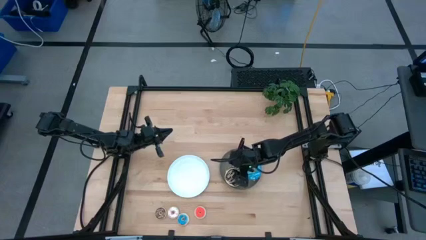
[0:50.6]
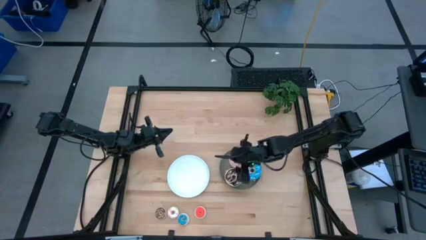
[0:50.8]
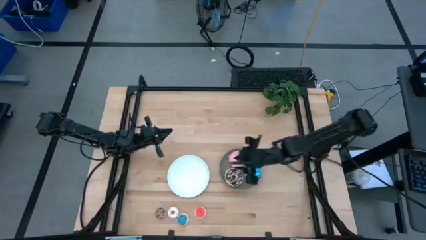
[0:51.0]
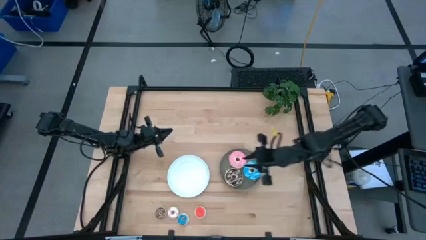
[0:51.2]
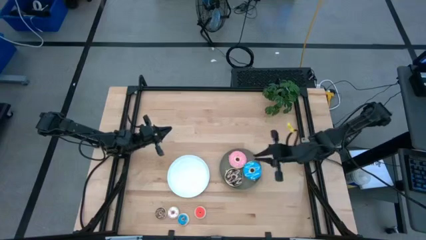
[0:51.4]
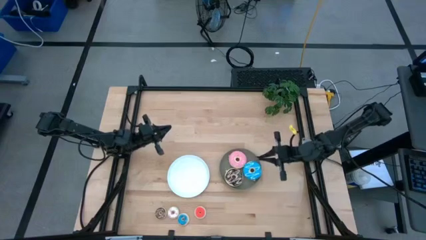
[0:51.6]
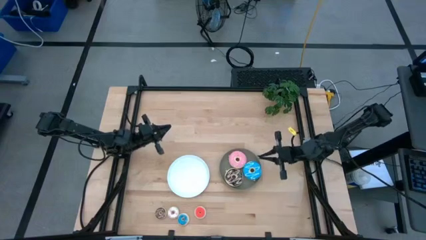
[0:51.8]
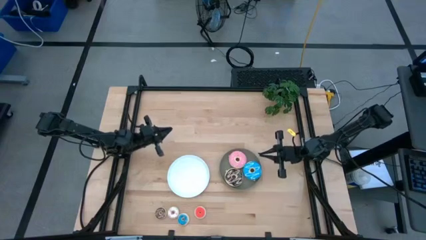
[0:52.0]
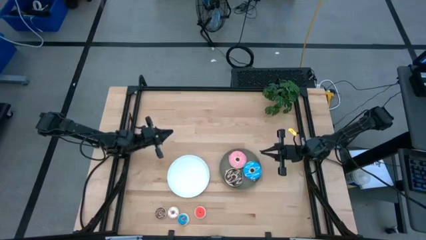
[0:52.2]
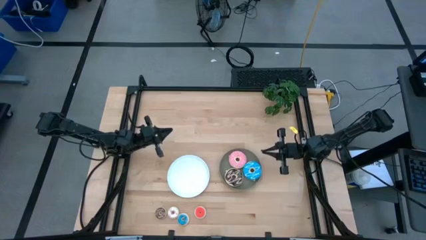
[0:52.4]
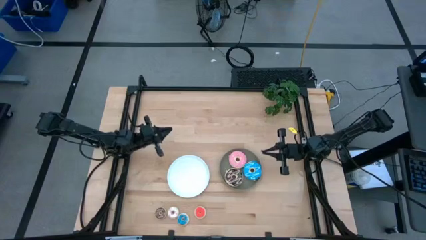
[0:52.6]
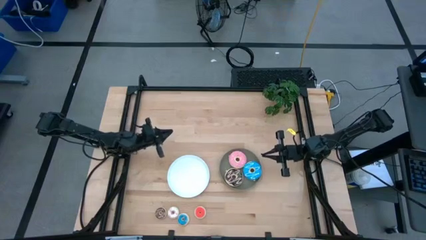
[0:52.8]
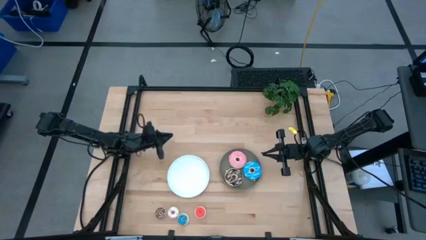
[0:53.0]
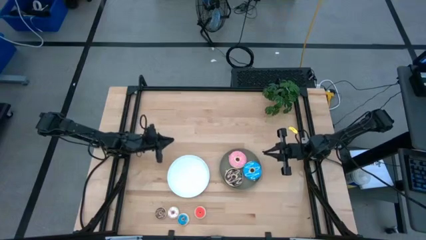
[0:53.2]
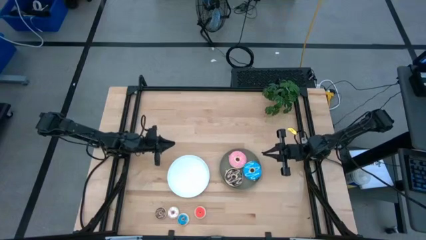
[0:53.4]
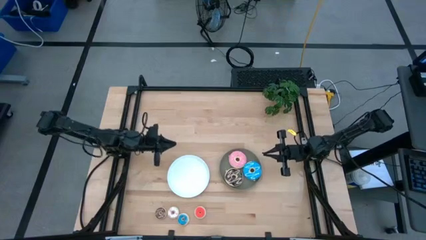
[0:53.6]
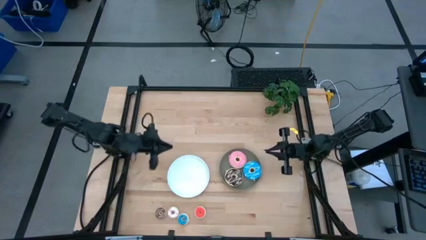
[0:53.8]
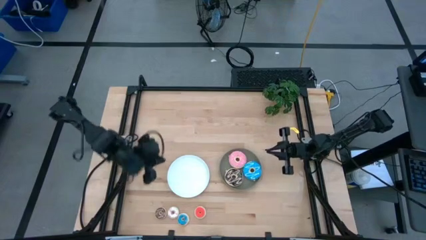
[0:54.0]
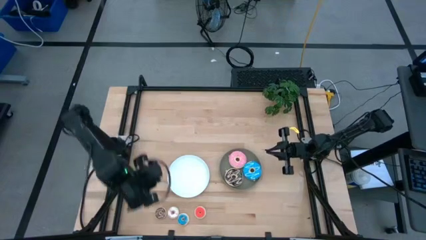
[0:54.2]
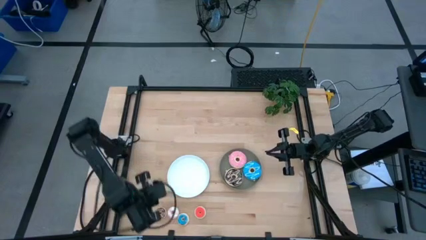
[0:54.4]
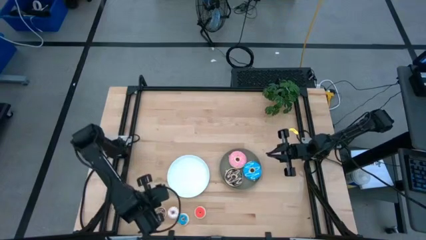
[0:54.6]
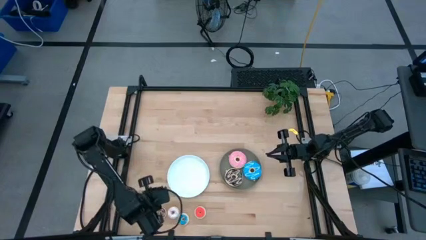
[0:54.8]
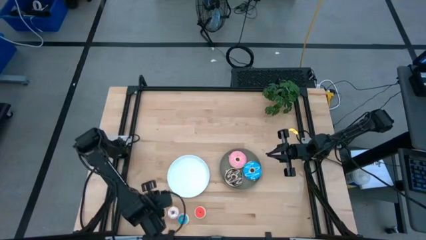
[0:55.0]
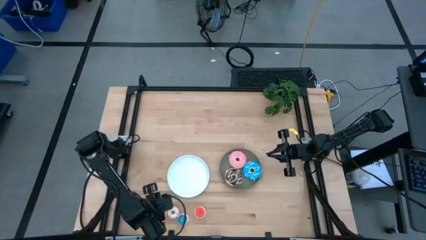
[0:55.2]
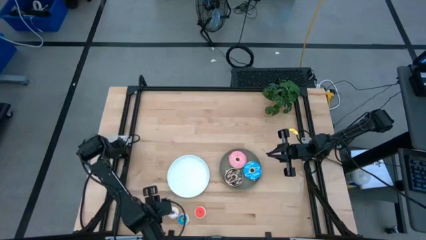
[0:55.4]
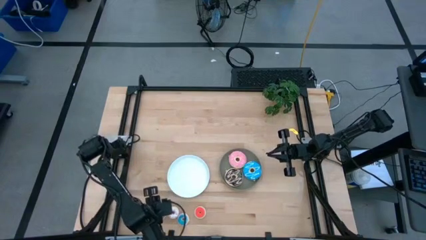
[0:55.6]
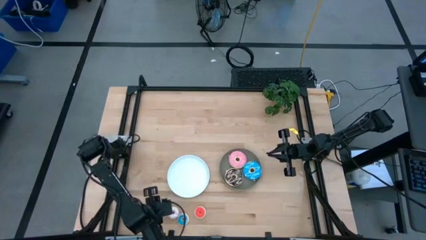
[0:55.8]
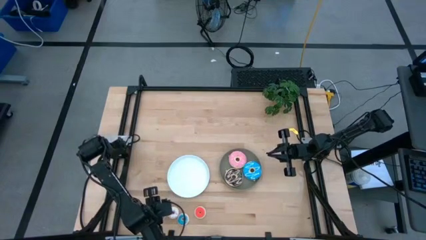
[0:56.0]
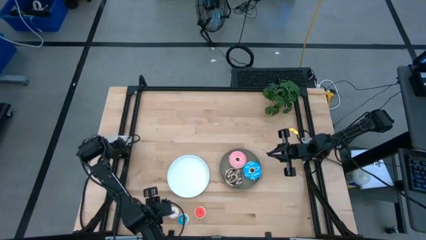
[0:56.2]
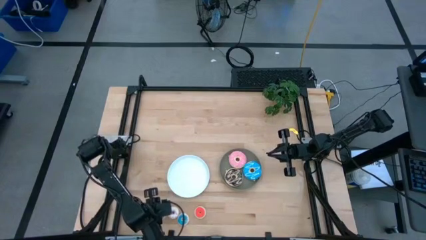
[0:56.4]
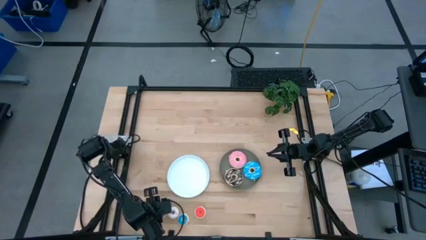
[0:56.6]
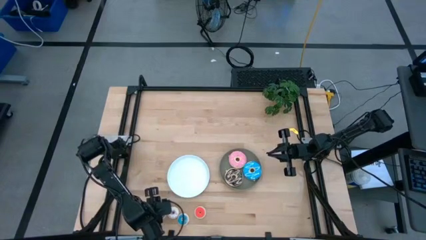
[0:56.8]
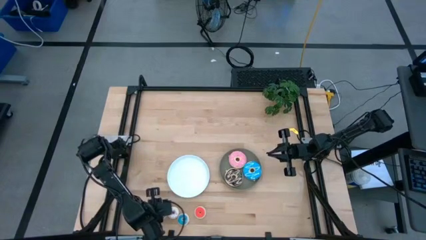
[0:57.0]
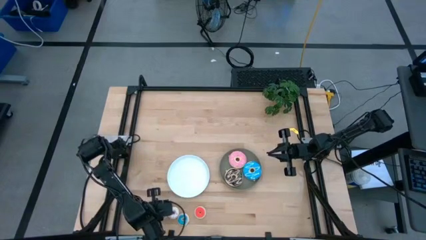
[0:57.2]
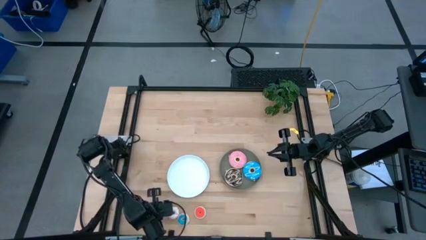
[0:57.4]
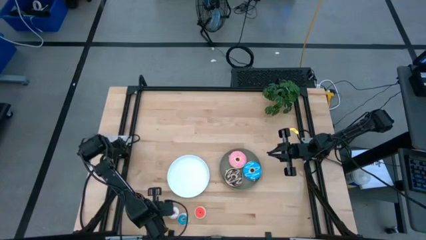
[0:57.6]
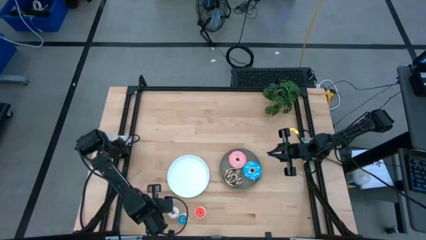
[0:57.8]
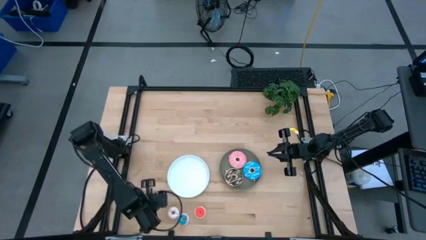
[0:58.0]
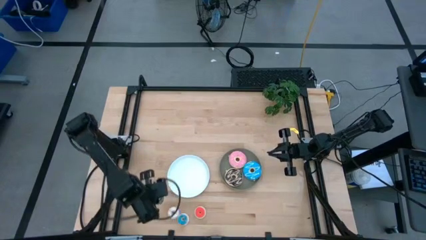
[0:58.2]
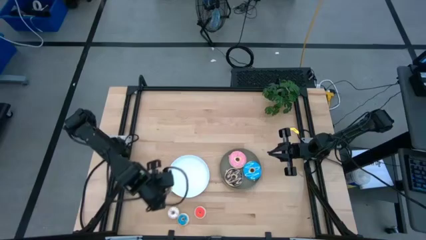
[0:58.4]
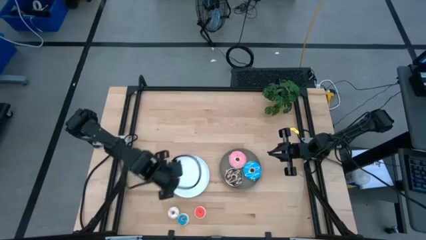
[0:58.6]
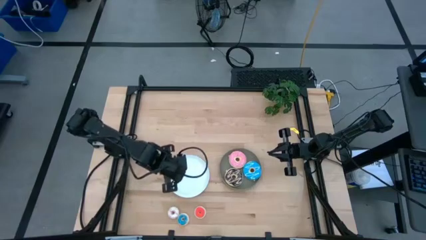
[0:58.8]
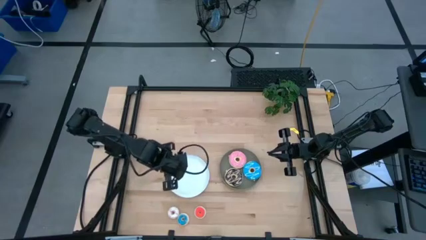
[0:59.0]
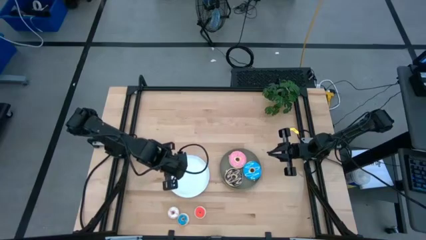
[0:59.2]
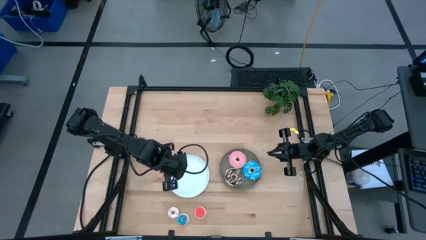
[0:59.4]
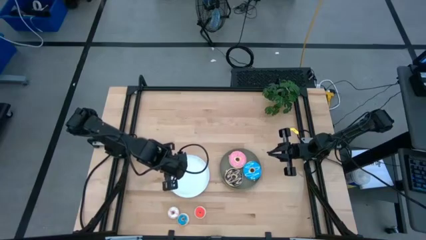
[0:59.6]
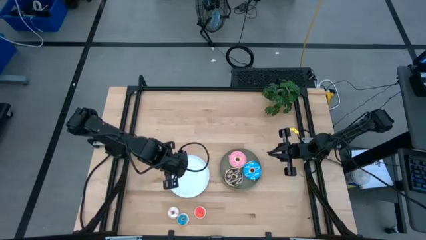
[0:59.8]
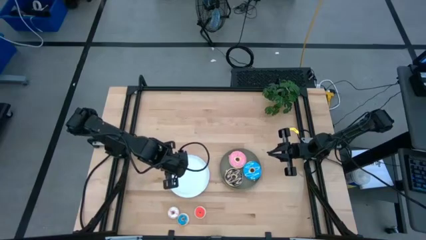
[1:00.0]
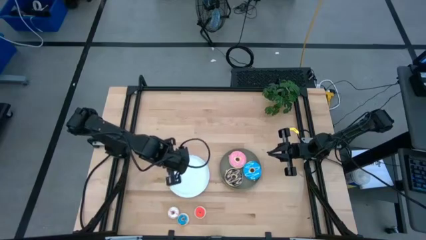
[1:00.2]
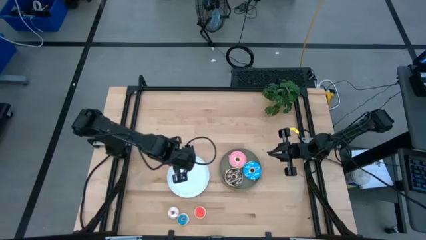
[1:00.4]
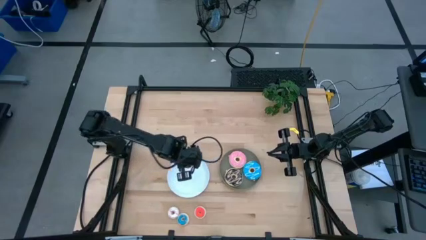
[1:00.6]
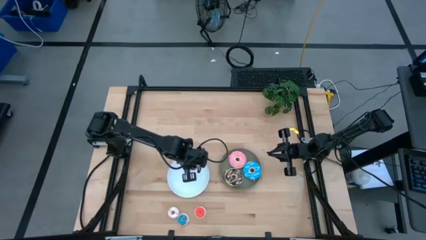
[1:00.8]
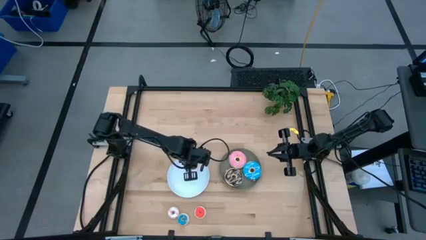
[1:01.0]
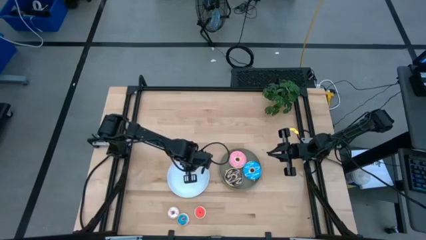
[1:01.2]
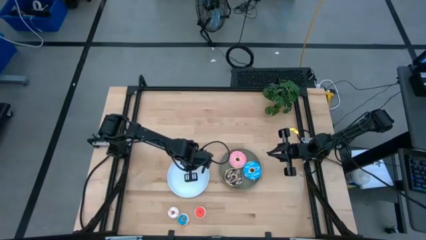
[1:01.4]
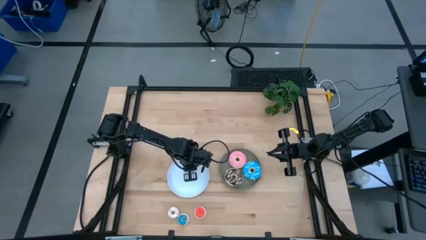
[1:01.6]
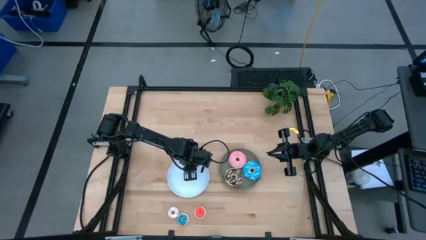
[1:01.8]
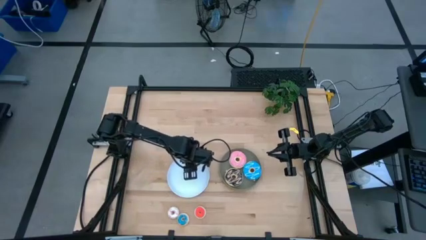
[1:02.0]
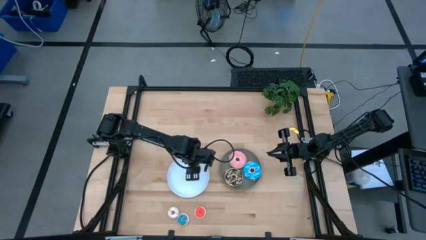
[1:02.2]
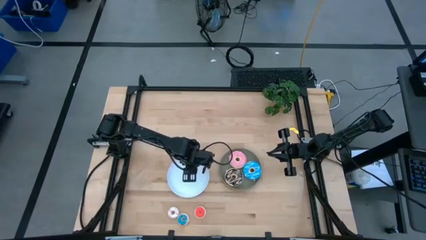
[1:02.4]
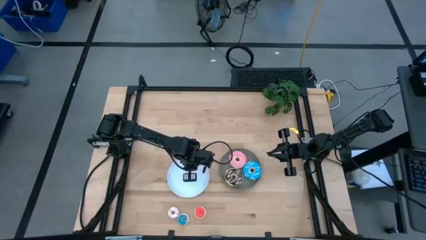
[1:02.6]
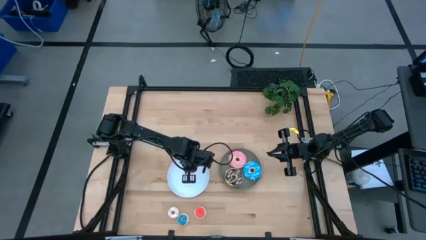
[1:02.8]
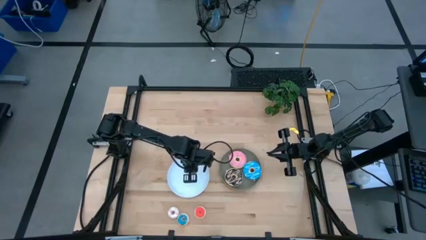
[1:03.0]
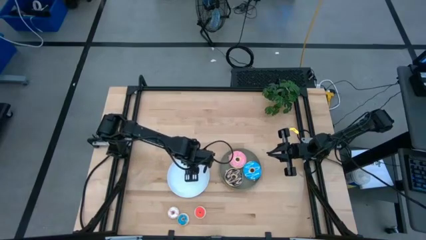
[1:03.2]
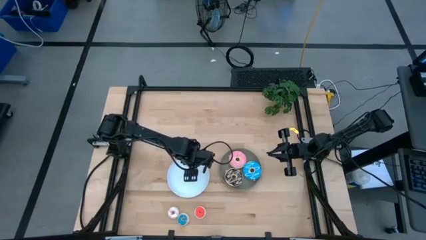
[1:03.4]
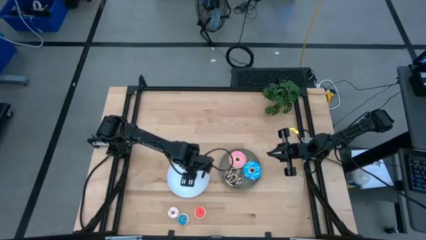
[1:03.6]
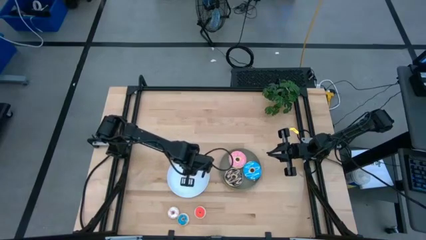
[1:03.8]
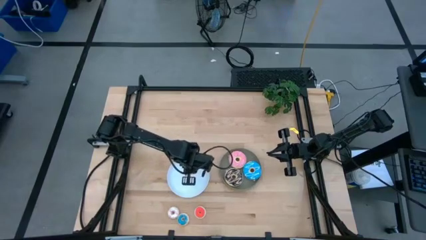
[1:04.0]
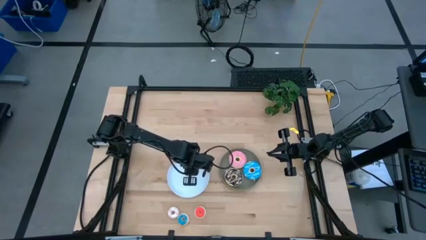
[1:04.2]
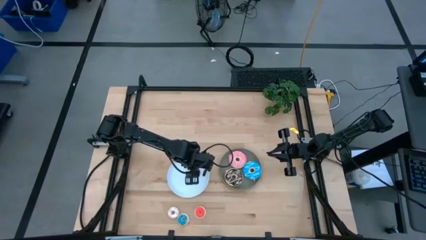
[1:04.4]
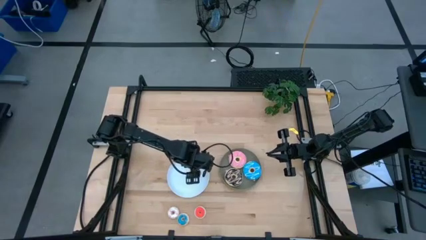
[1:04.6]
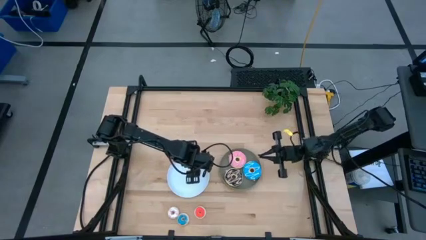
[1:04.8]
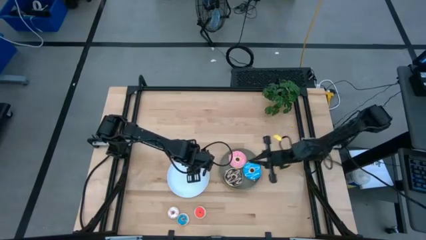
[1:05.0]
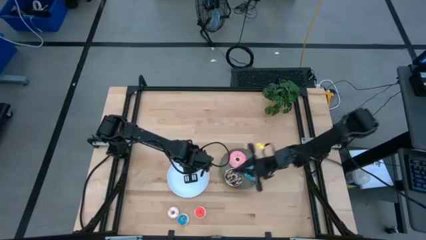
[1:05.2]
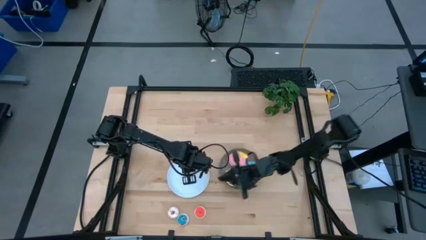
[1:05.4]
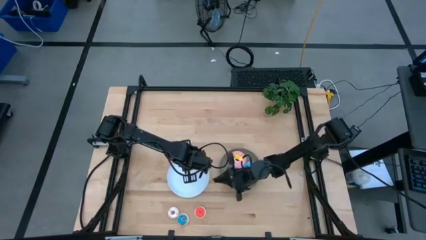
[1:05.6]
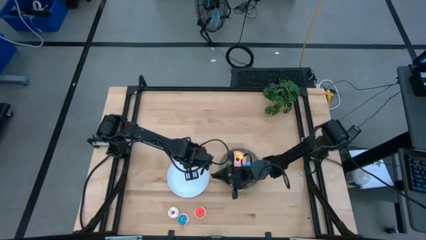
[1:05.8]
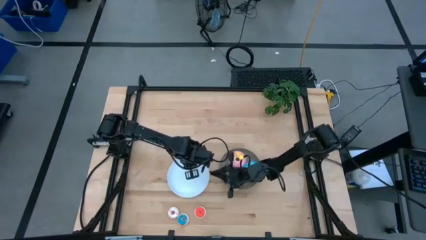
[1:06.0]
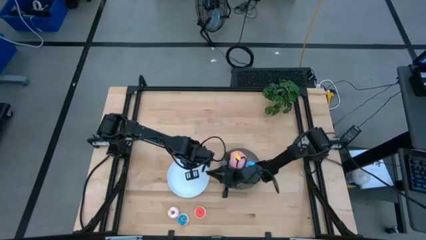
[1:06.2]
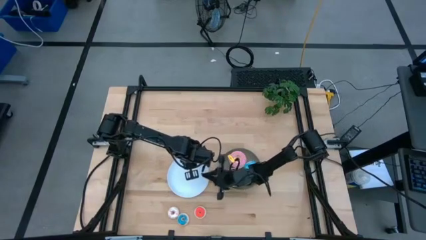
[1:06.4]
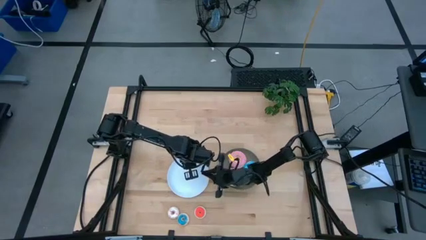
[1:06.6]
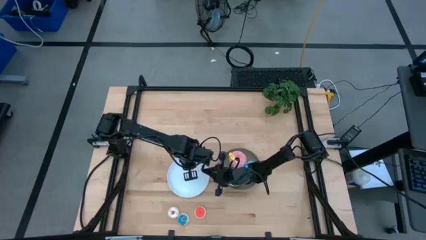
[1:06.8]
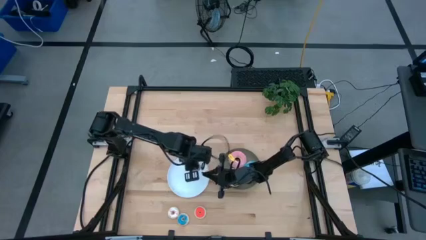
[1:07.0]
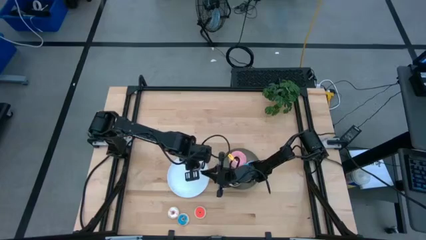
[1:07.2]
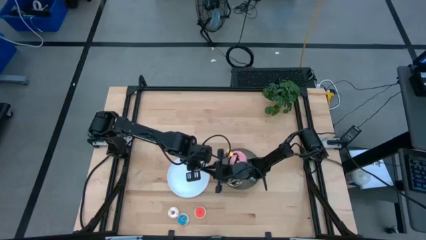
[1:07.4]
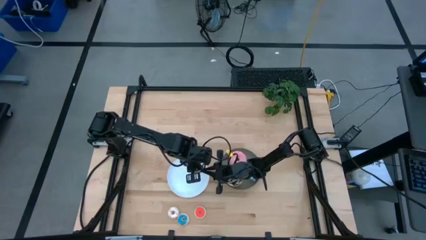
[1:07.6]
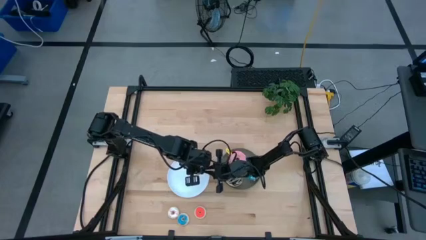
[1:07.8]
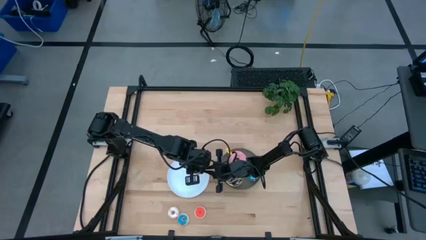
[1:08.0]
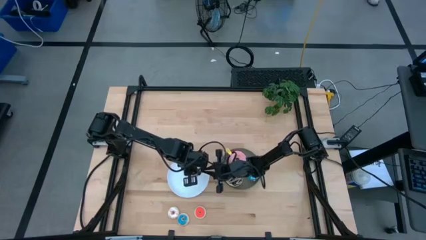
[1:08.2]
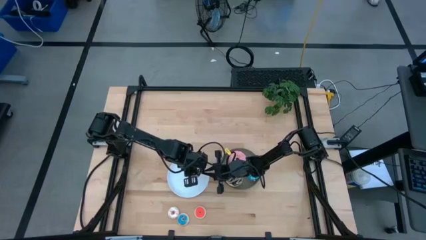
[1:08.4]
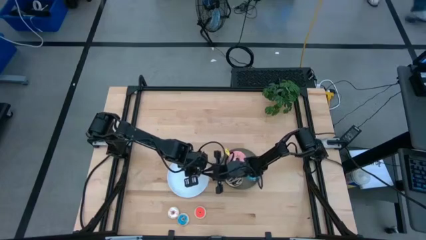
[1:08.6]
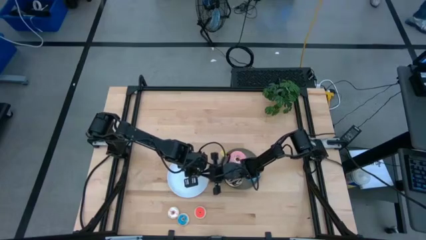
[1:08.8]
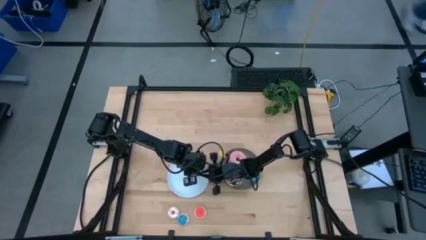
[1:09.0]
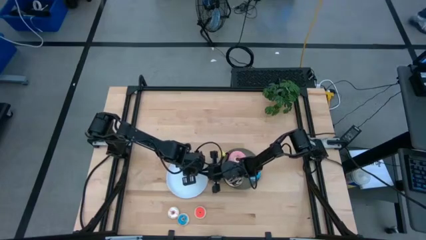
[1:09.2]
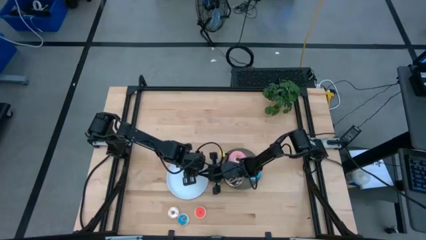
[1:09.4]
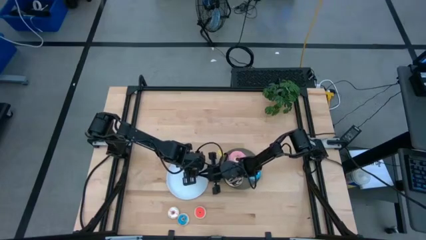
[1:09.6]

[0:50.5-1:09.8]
Task: Pick & Place donuts
Put the small brown donut on the white plate
